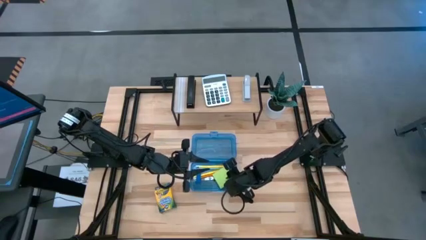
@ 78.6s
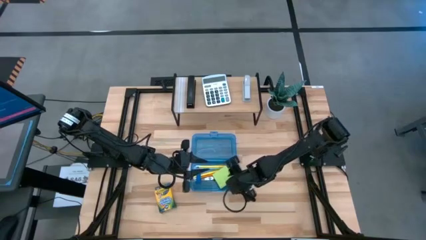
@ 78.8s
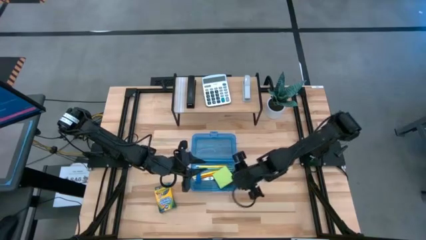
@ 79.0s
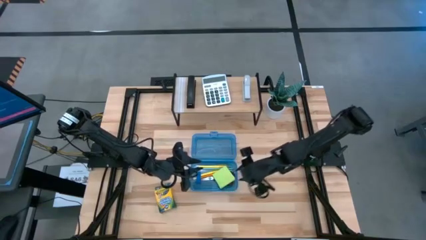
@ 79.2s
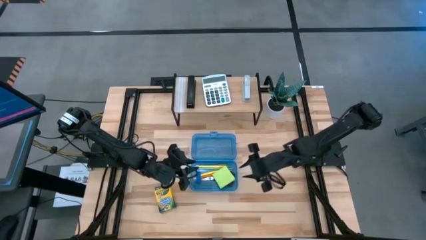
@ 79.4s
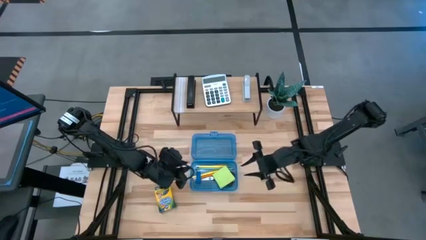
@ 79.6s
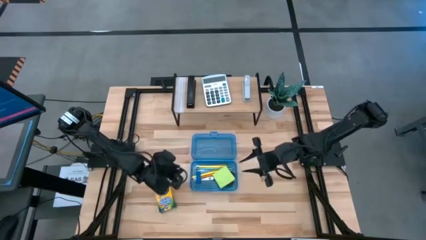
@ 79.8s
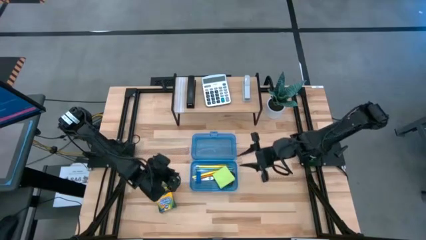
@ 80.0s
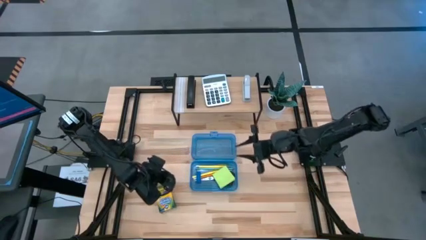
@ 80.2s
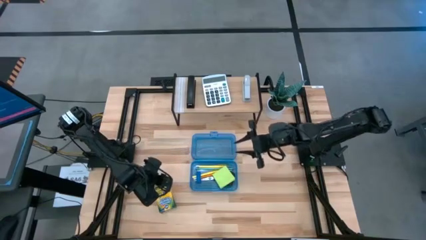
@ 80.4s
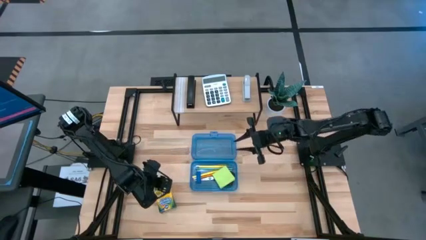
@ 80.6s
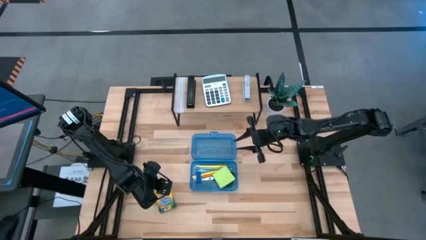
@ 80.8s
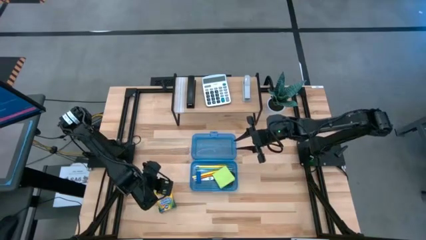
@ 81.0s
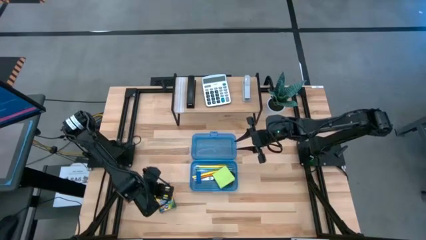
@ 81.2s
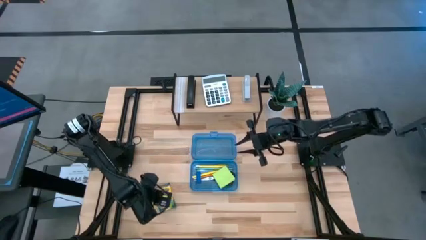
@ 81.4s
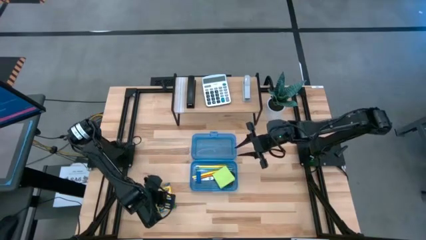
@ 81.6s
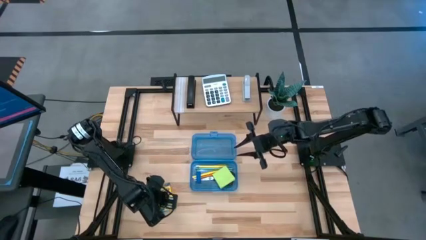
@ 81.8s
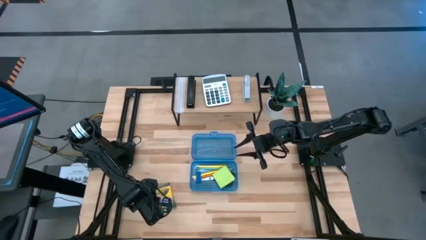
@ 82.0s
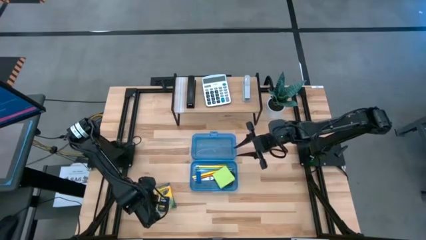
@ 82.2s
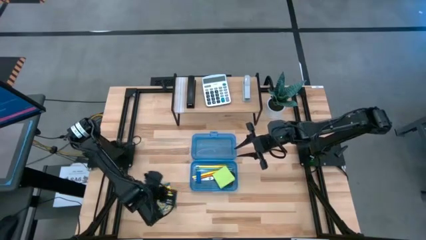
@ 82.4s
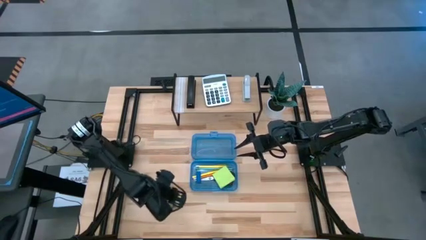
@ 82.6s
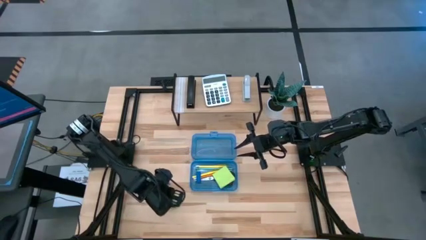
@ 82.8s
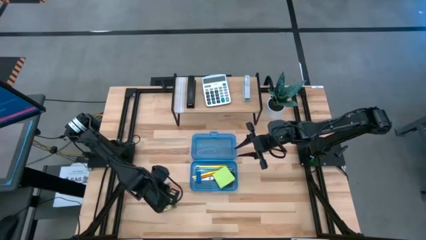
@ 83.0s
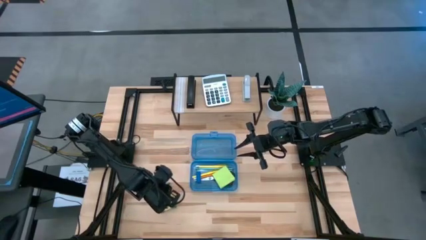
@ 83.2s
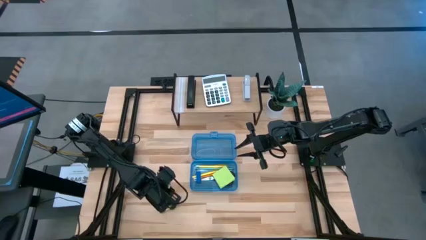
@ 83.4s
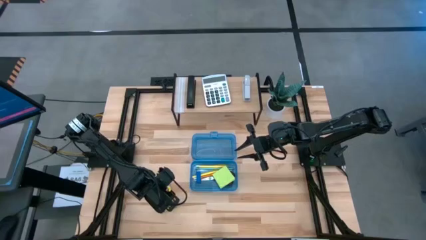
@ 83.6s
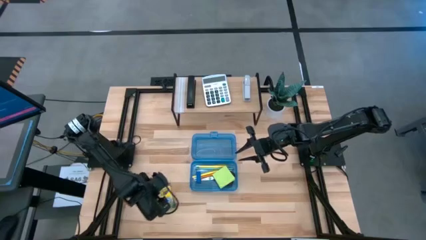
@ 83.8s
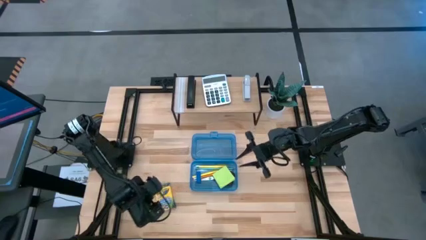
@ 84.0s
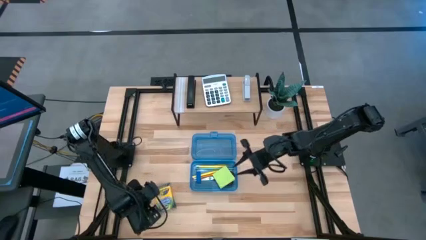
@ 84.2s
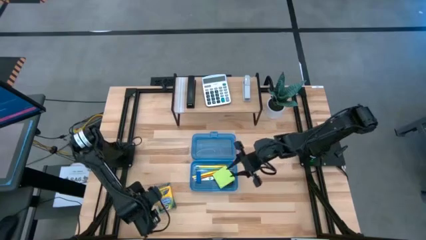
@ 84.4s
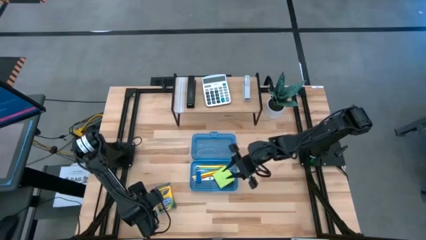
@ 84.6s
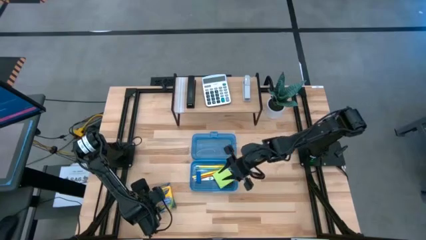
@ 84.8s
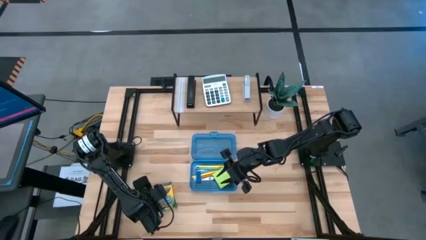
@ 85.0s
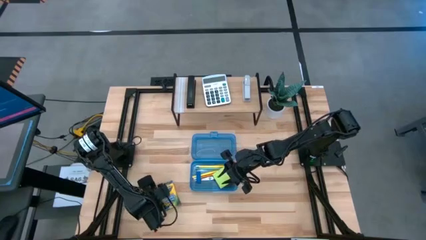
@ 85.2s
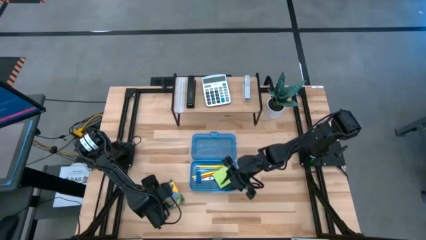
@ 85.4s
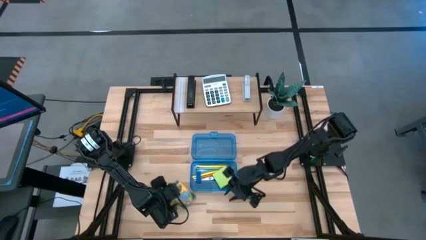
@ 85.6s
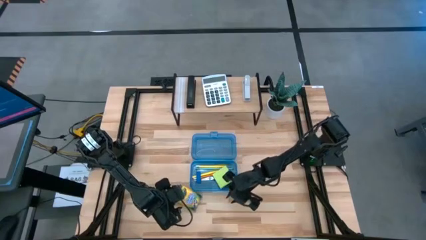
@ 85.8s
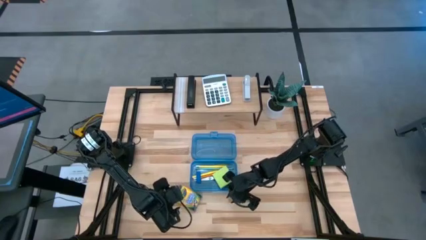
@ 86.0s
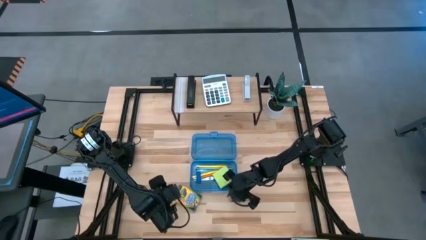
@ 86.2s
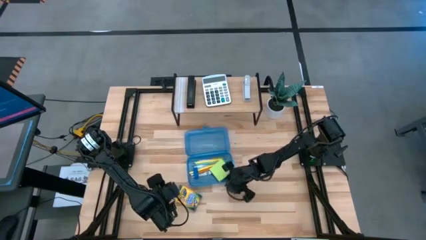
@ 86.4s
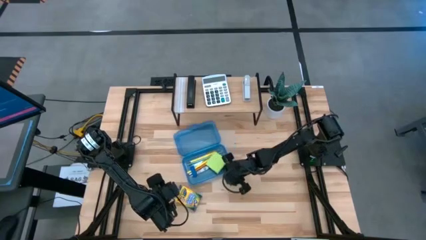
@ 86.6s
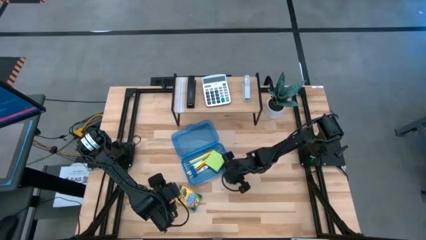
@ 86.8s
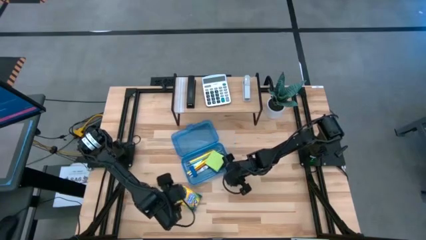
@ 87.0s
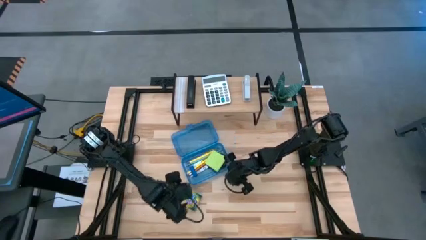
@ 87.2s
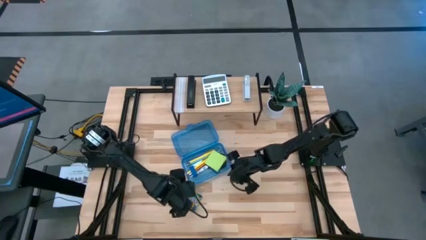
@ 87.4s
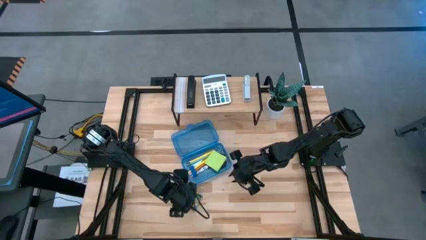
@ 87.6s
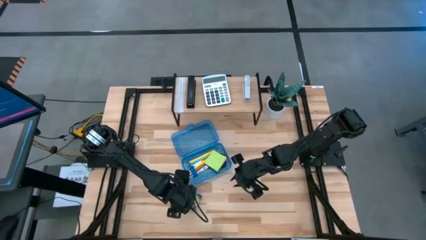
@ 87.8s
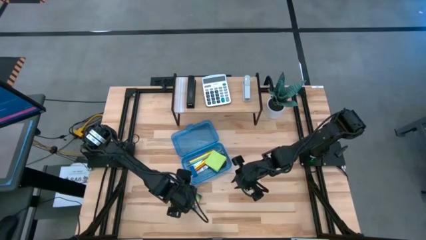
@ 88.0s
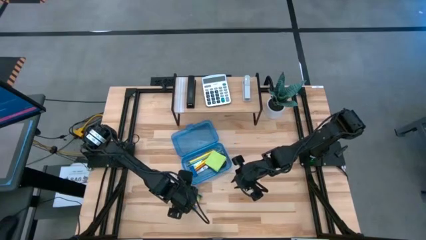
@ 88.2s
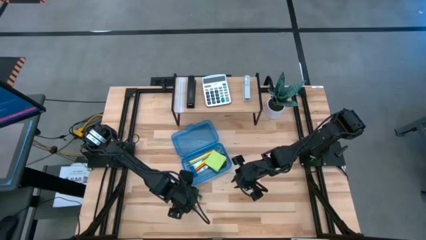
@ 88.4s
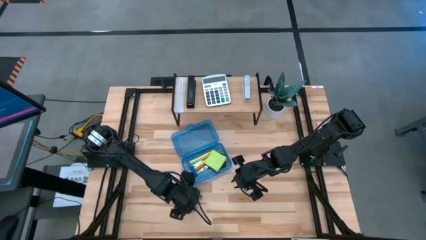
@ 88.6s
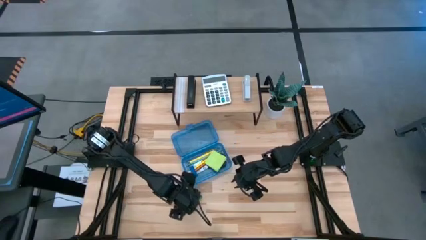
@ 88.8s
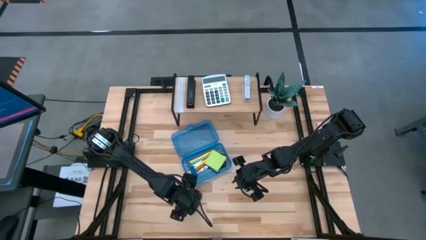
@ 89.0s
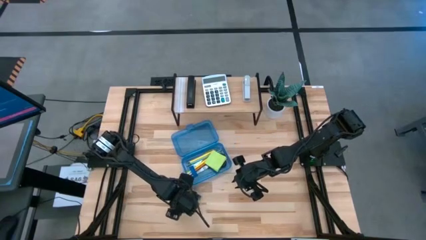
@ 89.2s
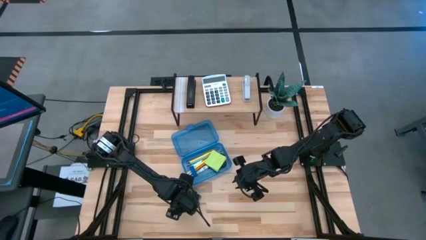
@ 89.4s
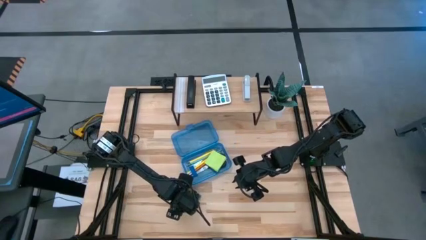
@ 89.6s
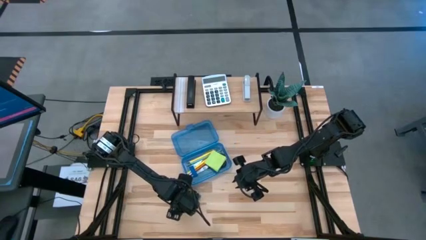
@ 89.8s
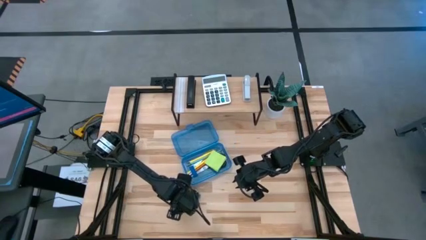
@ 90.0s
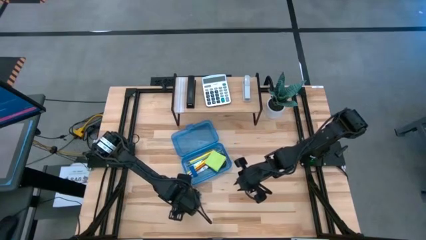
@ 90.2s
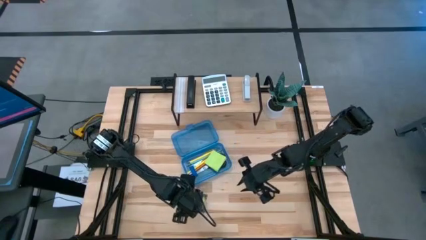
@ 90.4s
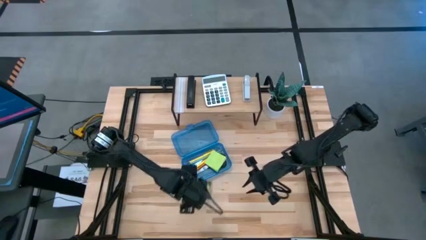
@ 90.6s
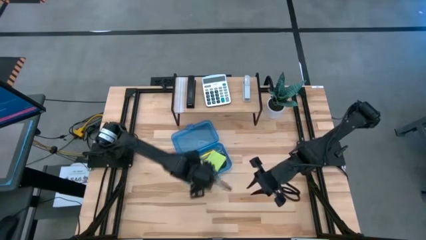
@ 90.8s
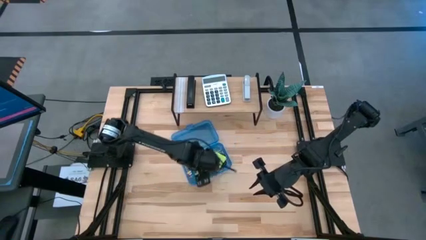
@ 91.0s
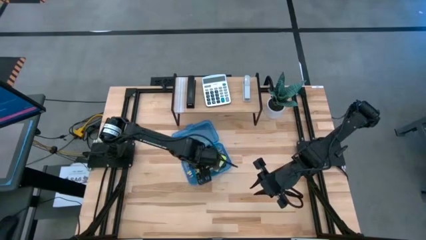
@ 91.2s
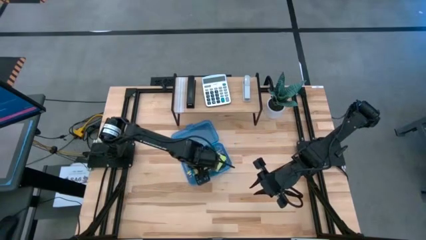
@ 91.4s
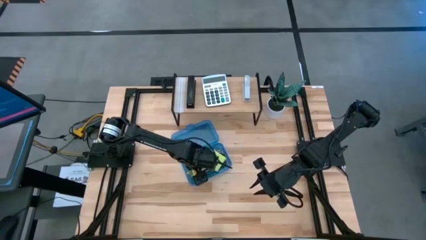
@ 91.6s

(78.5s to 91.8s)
Task: Pack school essentials
Put the yellow crayon box into the blue supply box

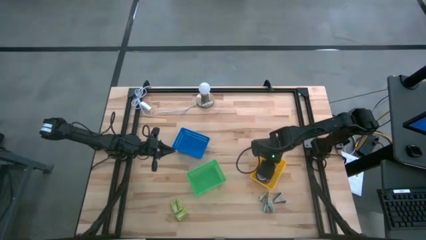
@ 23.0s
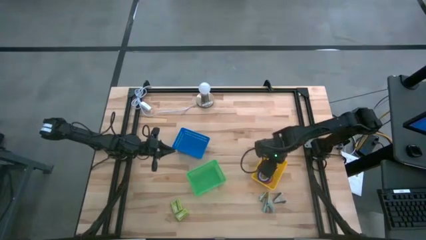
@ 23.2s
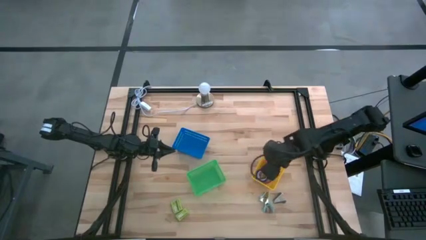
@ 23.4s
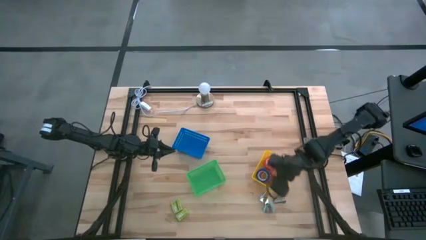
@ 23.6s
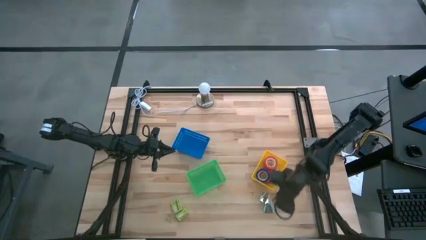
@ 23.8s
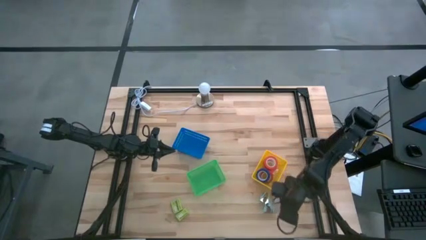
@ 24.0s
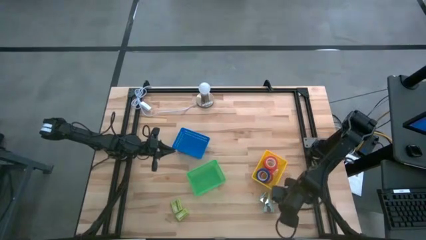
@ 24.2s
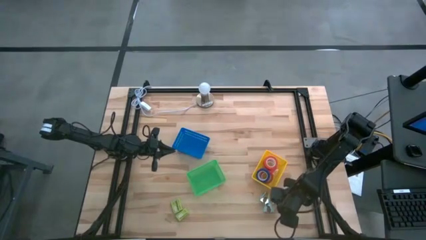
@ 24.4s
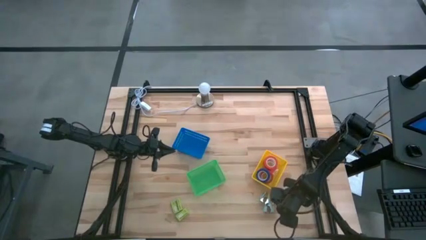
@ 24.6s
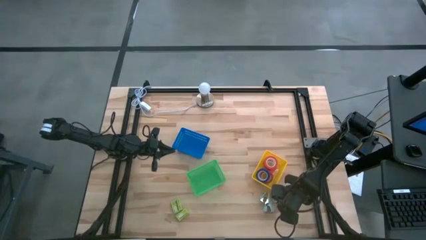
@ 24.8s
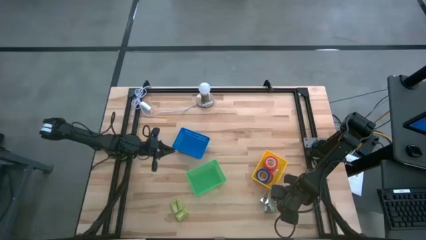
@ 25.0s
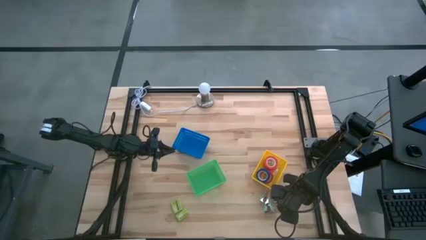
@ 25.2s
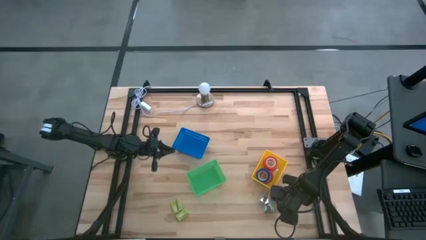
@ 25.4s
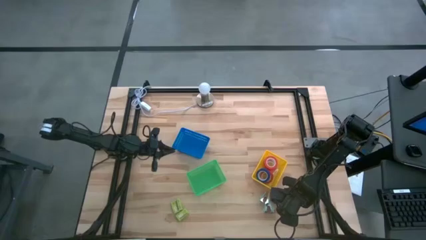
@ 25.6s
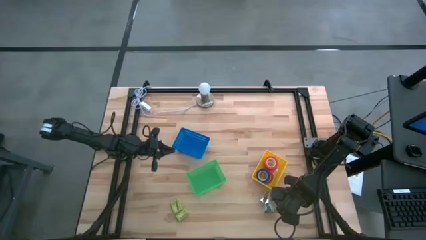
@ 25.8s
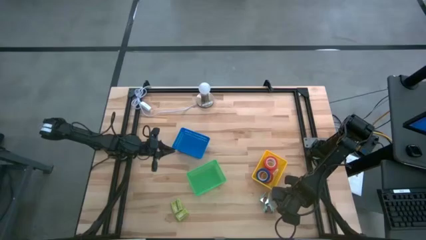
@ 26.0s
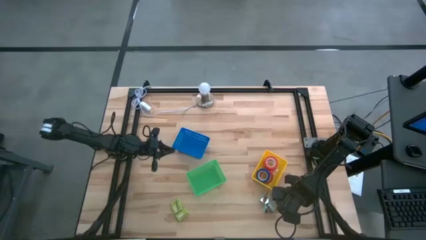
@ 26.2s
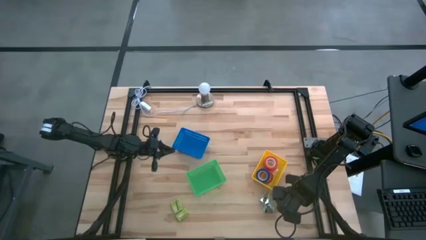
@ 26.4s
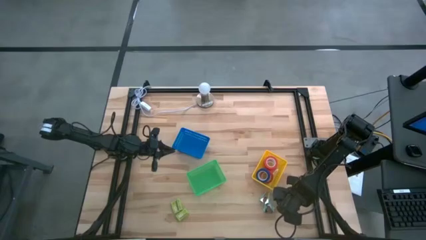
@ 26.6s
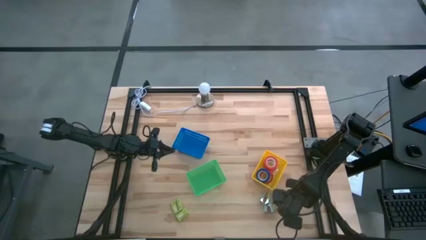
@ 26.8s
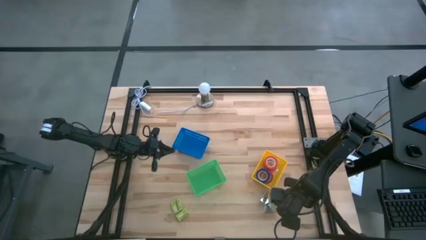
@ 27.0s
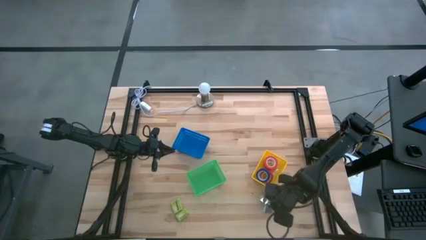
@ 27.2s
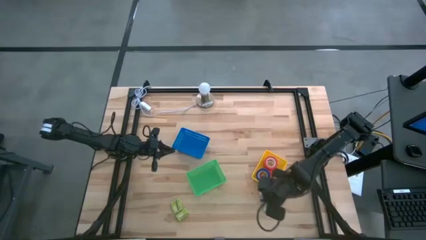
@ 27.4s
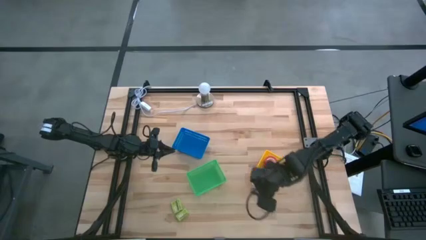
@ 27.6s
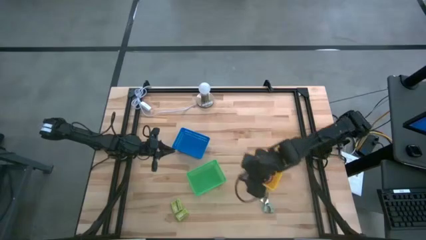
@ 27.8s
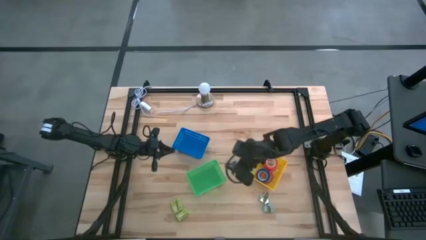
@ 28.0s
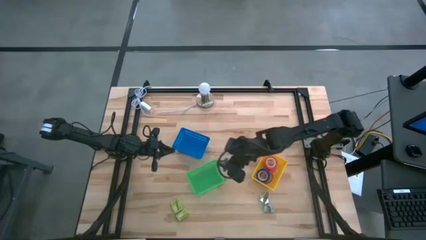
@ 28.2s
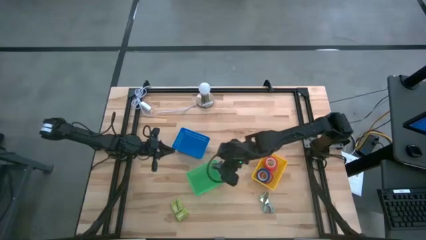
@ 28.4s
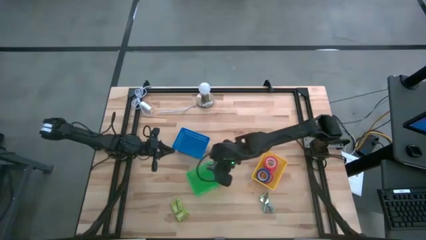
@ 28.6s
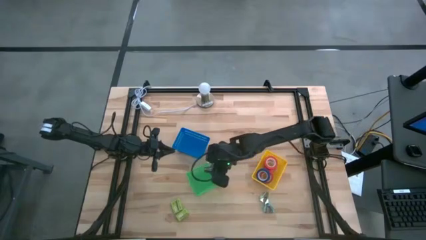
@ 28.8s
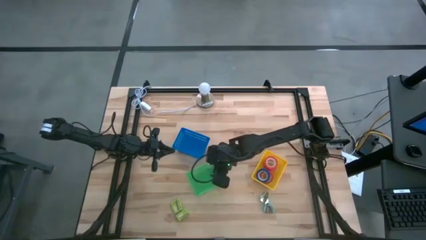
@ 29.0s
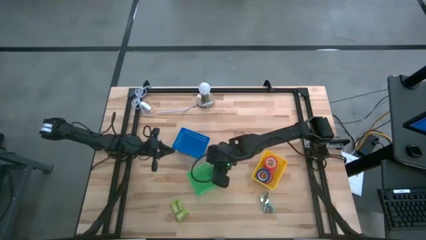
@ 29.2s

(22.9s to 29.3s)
Task: Pick and place Stapler, Stapler remover, tape
Put the black staple remover into the green bin
